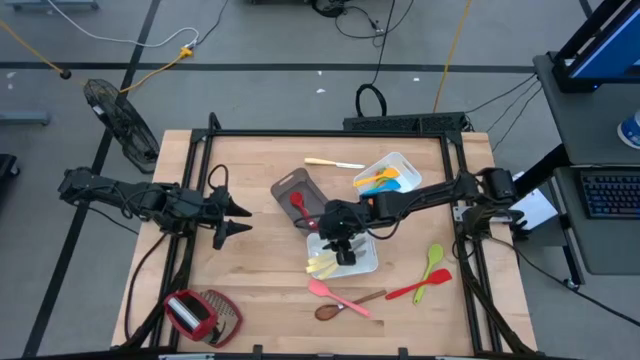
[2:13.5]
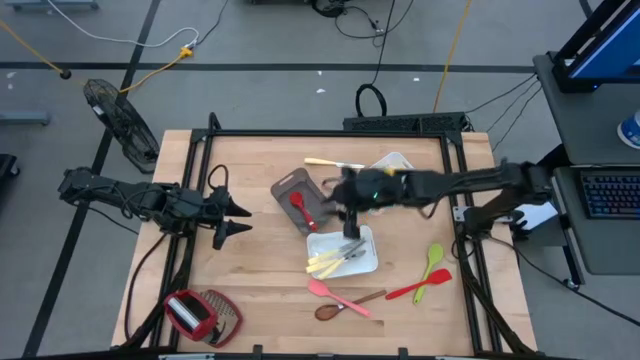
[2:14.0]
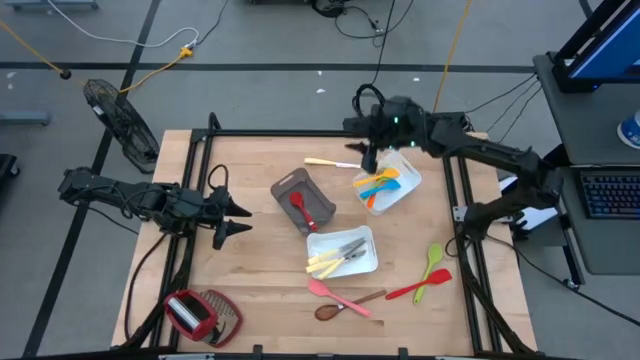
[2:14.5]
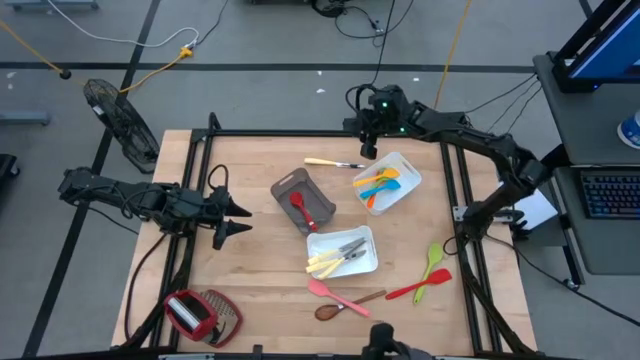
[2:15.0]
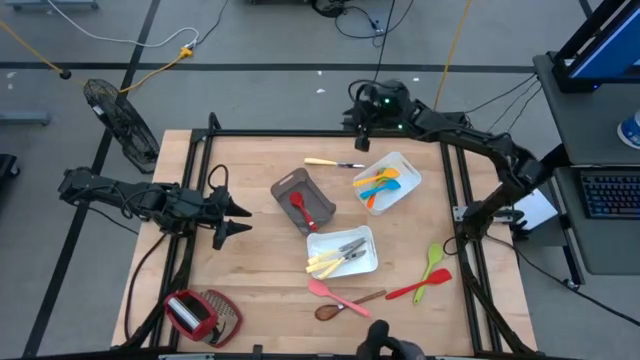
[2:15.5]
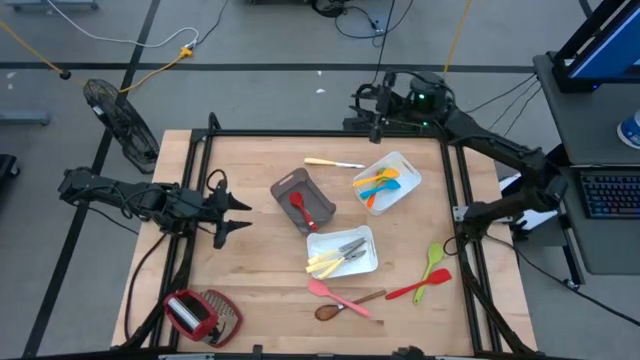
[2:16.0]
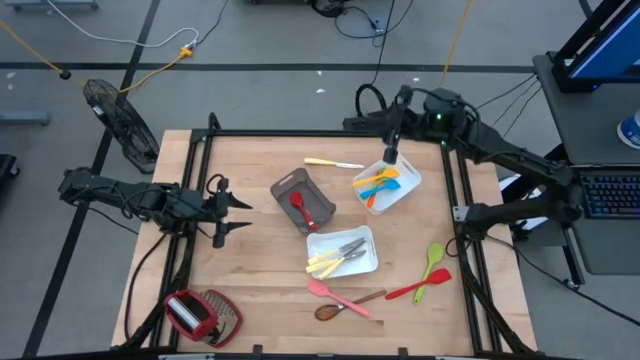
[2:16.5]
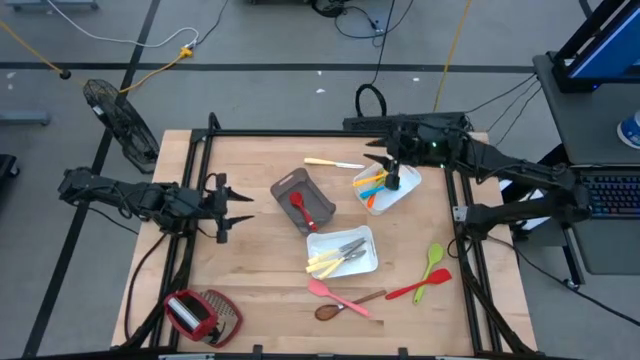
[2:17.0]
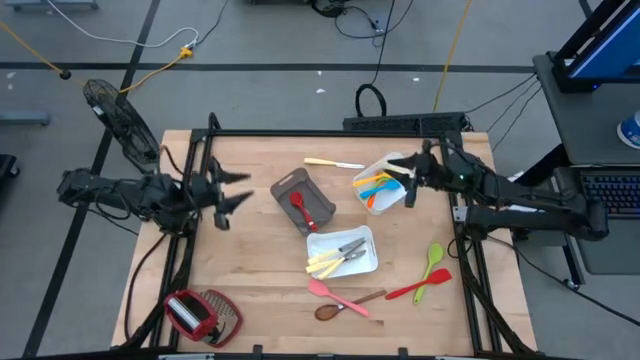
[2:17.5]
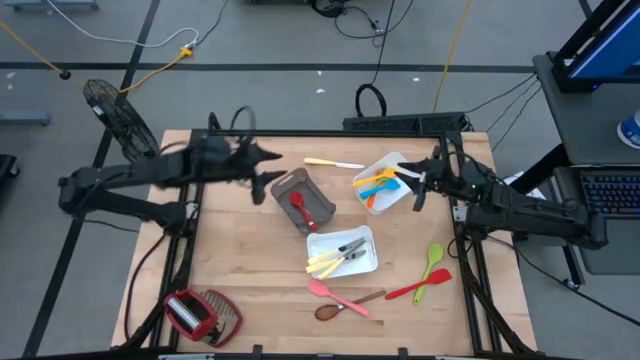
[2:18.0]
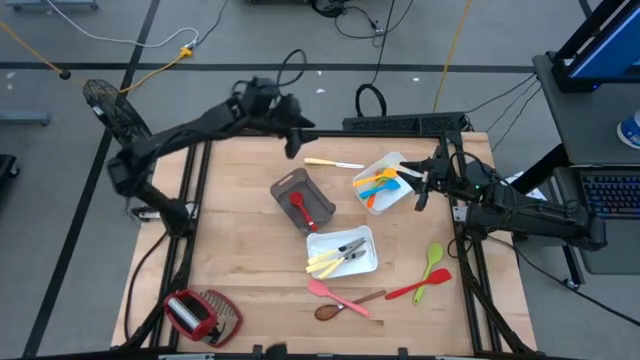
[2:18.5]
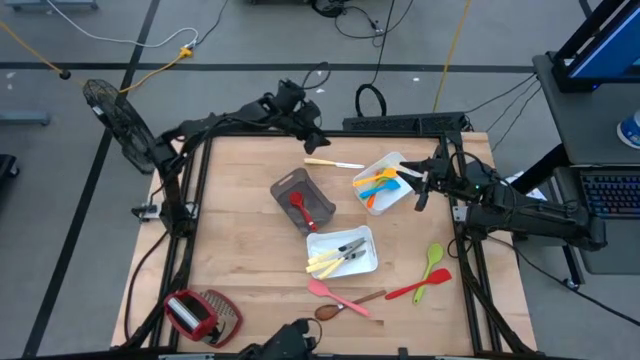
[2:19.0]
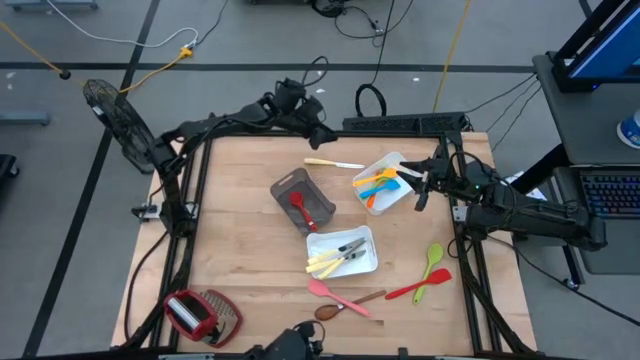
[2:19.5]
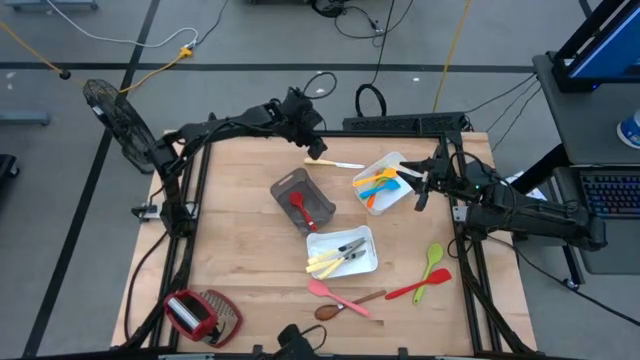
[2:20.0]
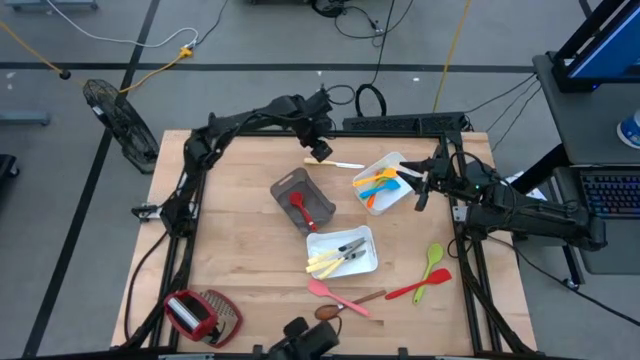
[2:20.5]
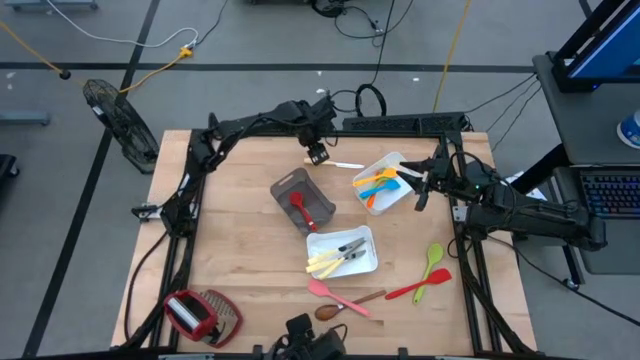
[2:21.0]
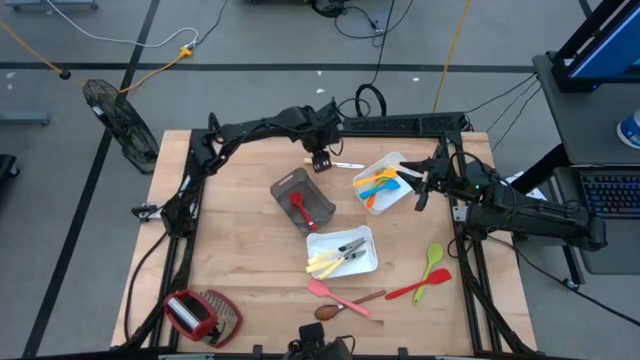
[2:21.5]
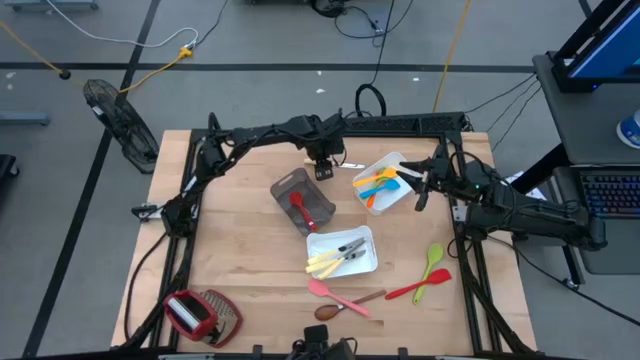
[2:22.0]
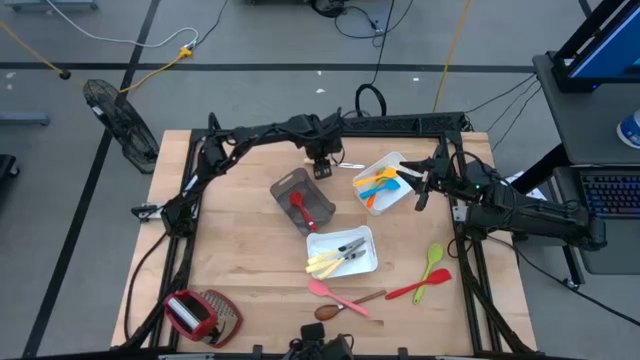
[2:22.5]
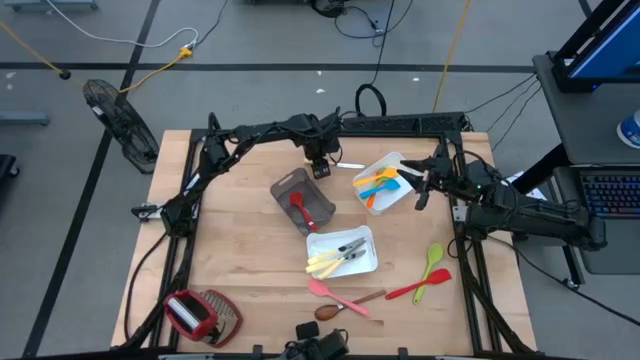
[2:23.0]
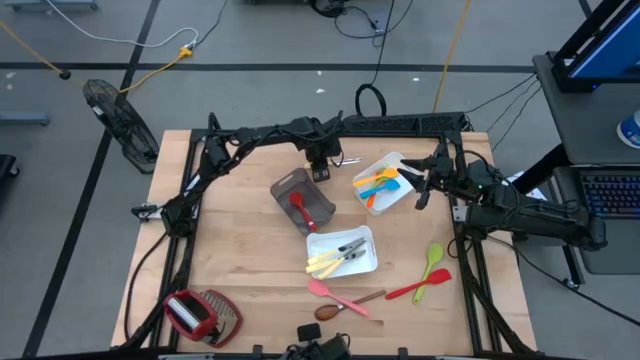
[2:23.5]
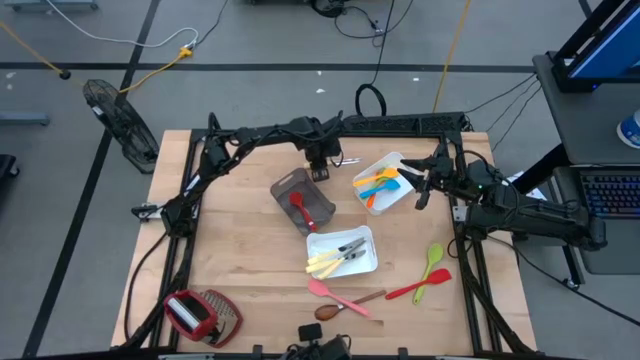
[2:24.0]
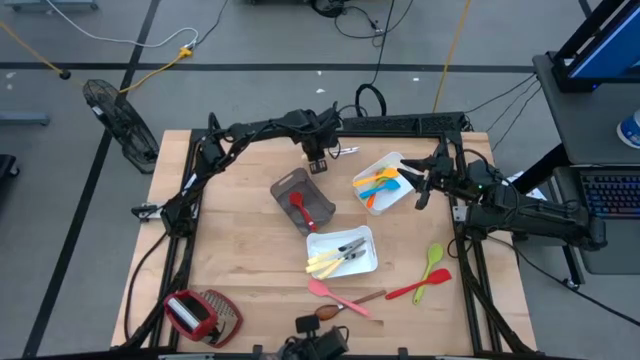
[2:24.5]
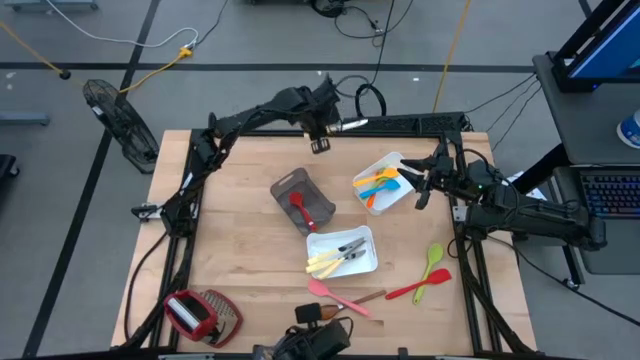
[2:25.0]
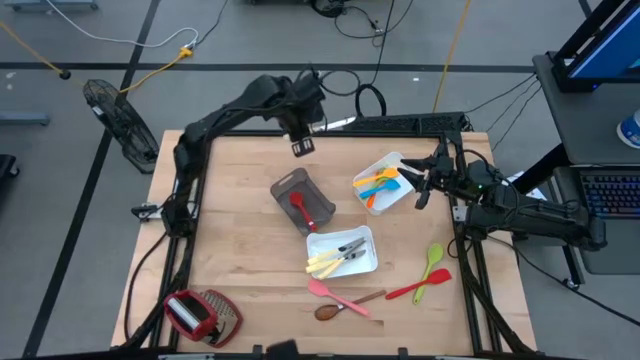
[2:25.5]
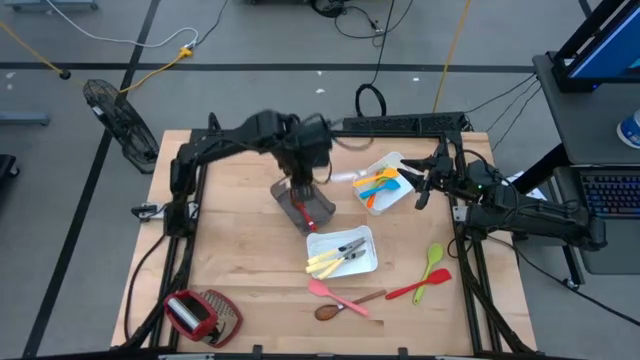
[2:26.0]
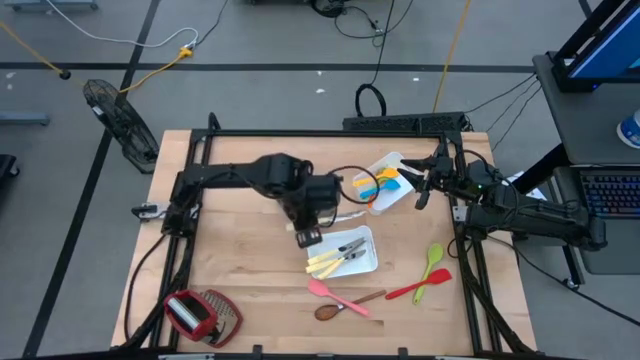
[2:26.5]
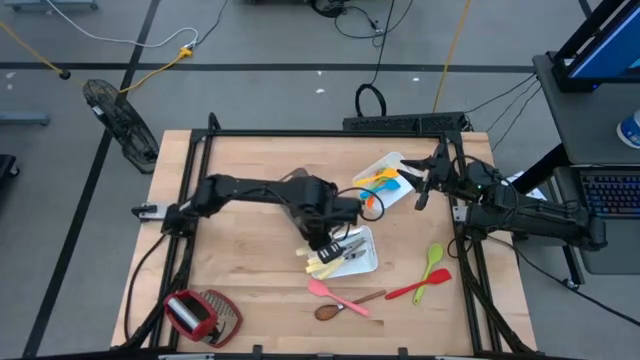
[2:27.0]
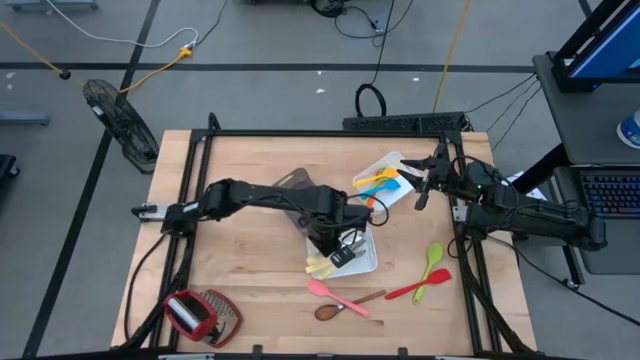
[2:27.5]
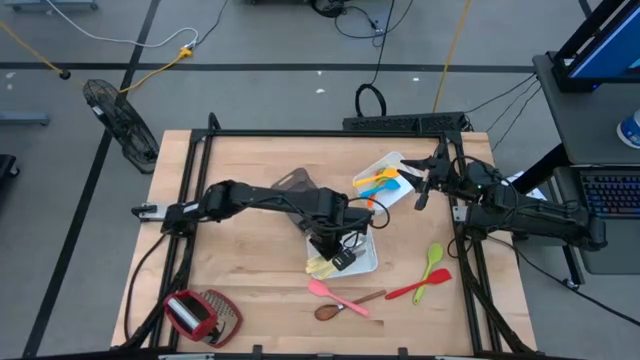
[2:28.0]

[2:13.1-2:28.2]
Task: Pick & Place Kitchen Items
Put the yellow table knife into the bottom white bin

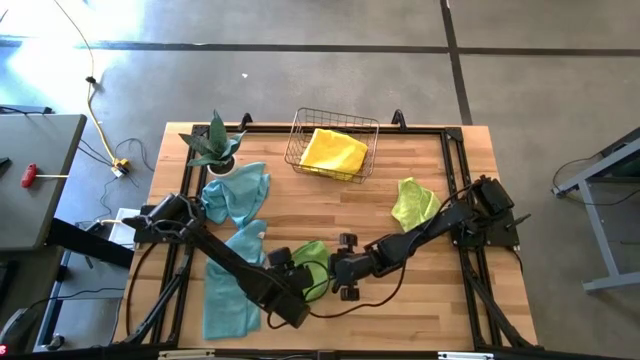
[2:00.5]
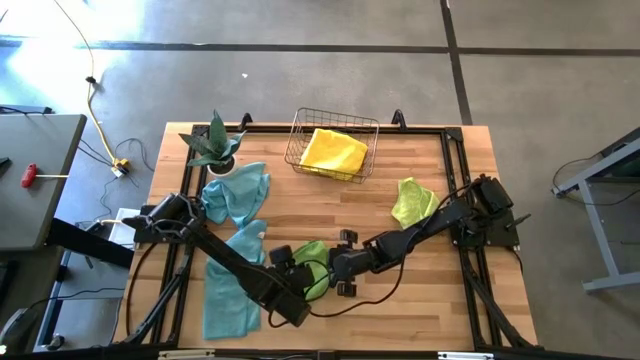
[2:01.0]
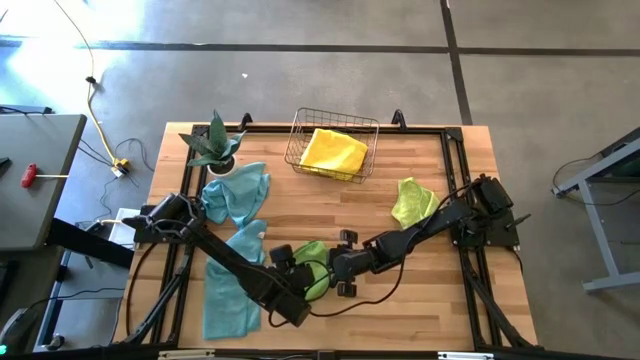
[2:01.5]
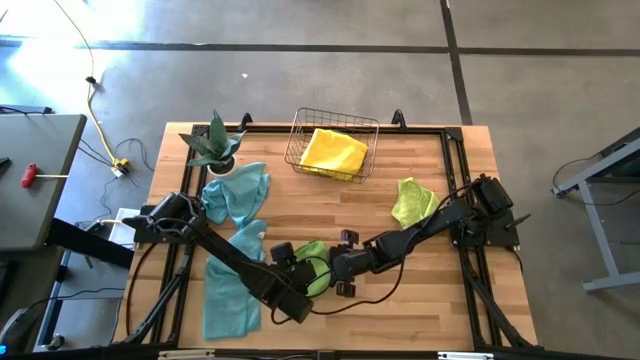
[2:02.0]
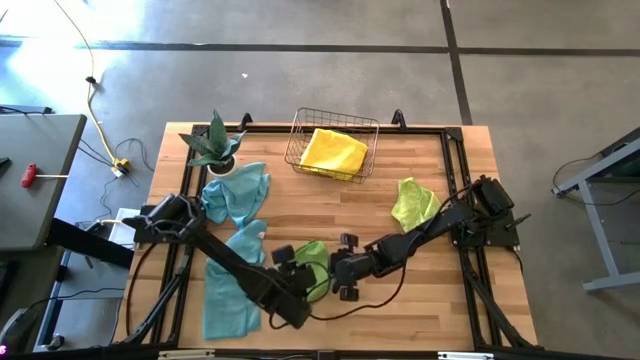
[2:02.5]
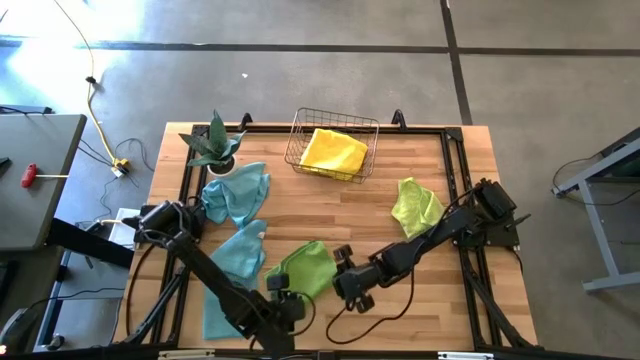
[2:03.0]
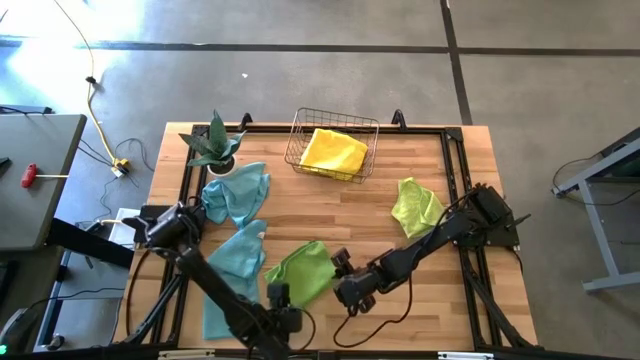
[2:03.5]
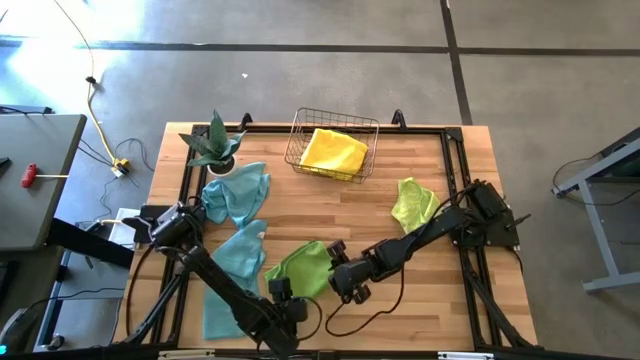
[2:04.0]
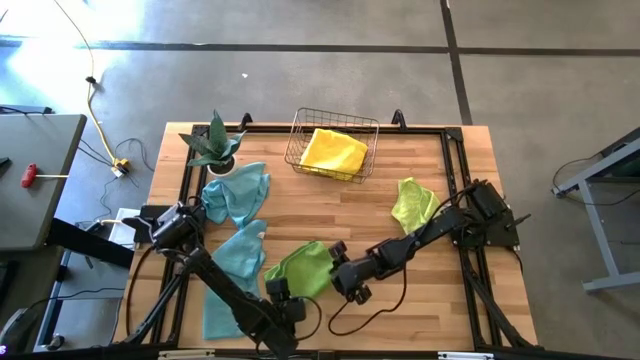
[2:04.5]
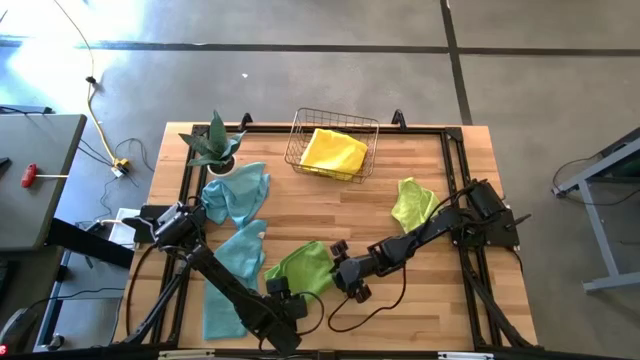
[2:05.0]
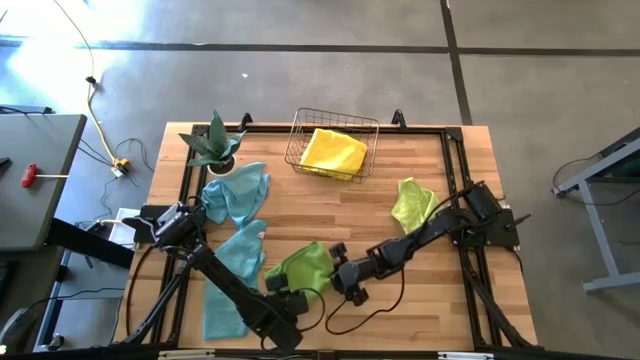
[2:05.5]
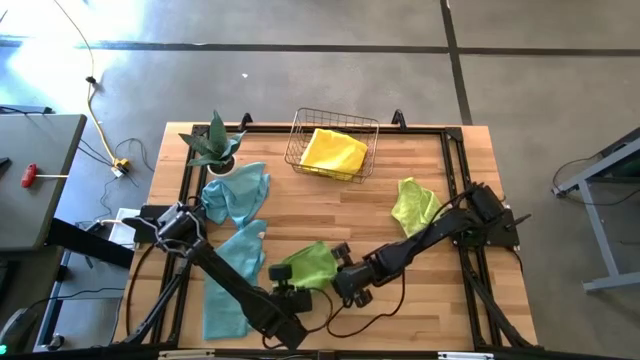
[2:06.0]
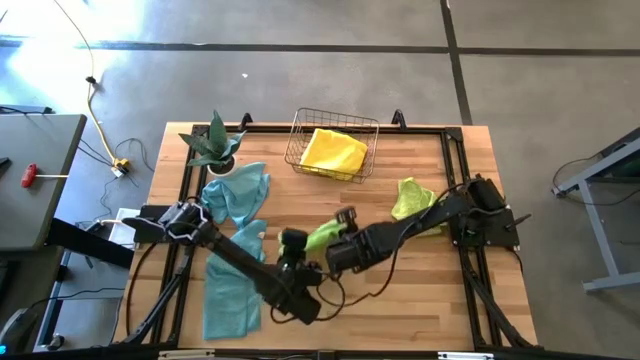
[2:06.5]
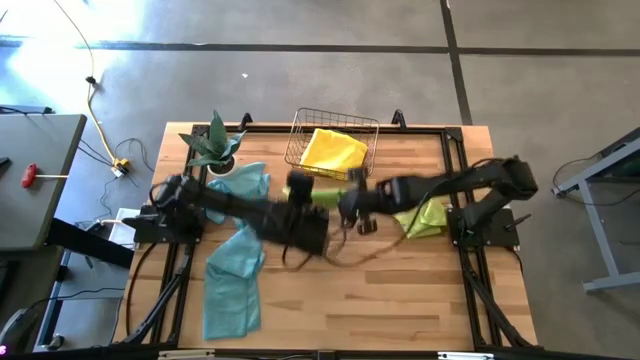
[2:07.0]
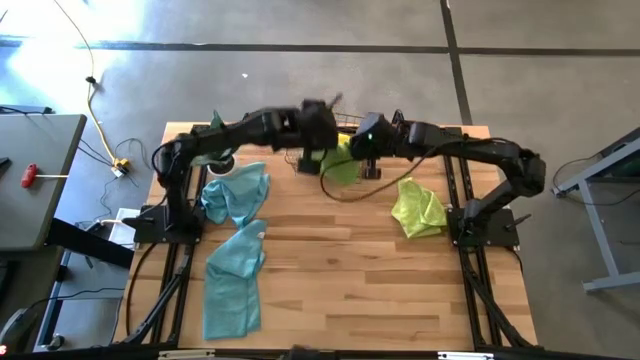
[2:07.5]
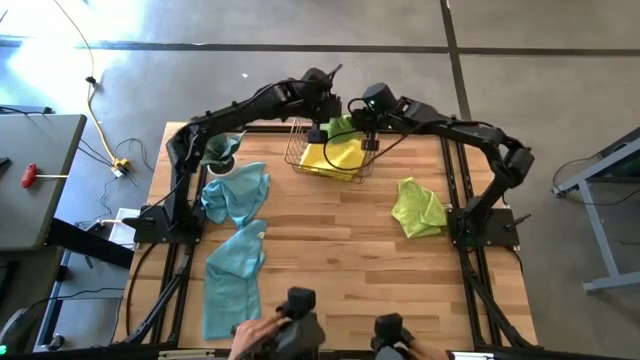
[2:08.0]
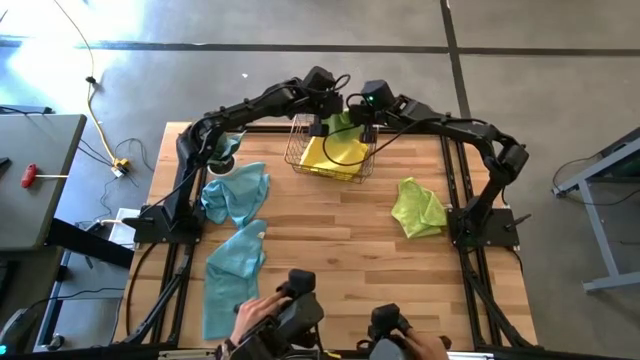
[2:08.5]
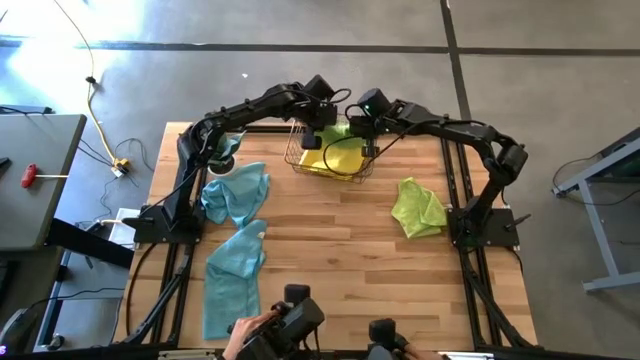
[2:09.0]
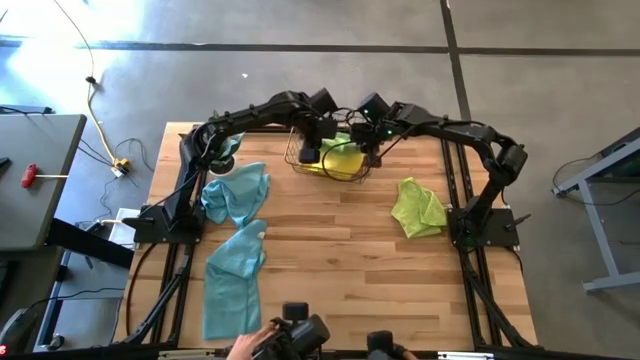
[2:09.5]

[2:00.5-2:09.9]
Task: Fold microfiber towels
Put the green microfiber towel into the wire basket
